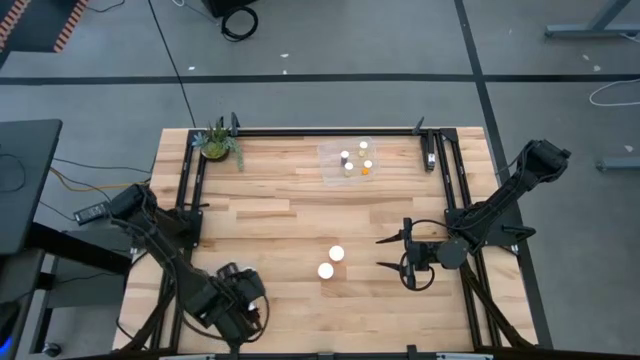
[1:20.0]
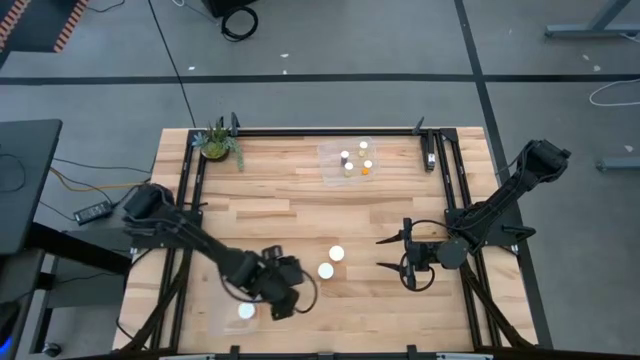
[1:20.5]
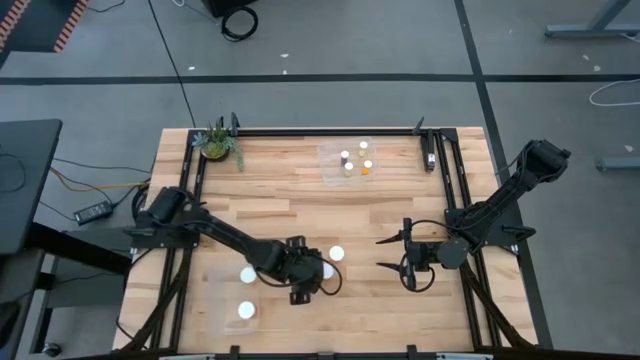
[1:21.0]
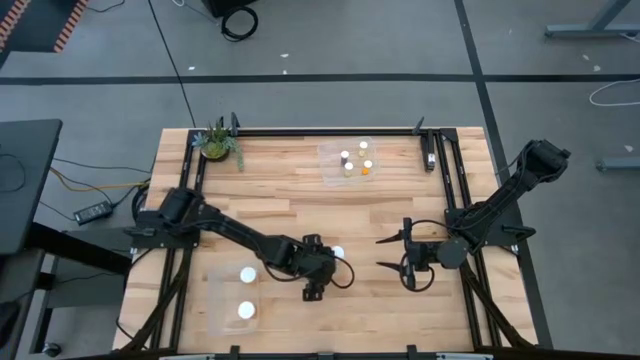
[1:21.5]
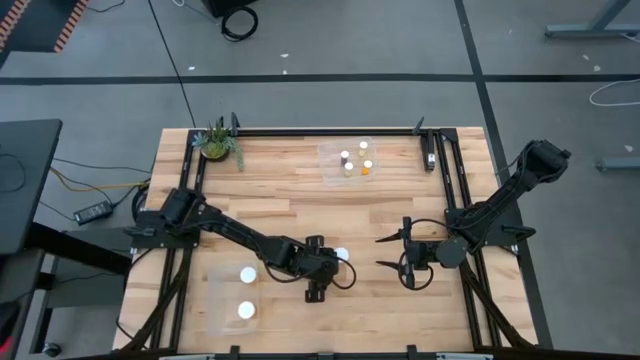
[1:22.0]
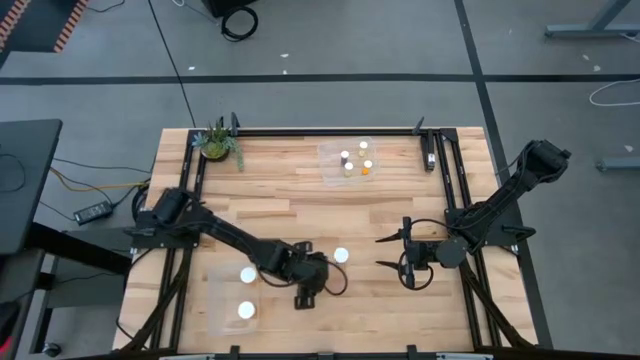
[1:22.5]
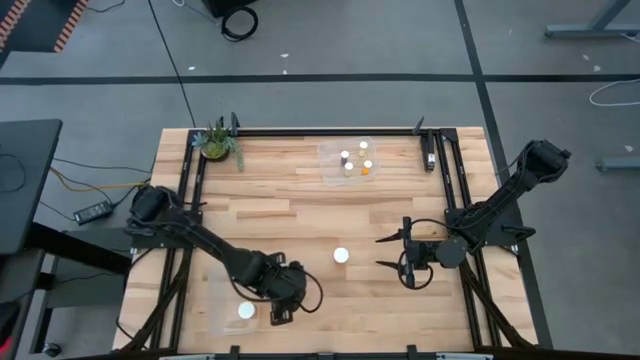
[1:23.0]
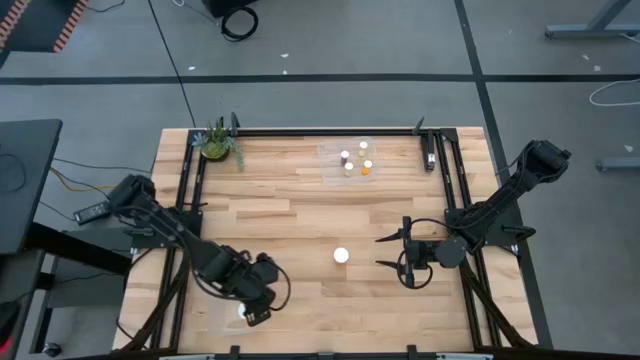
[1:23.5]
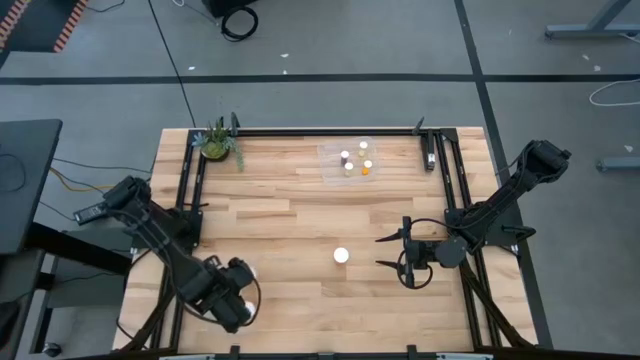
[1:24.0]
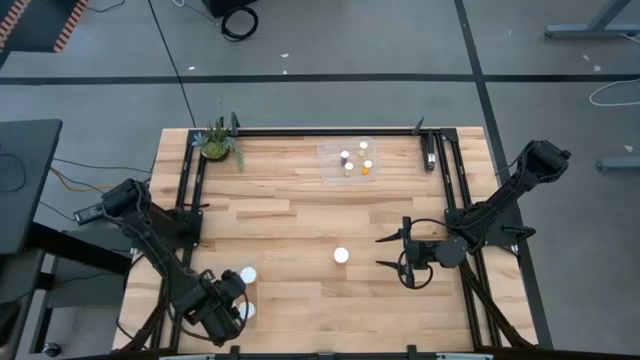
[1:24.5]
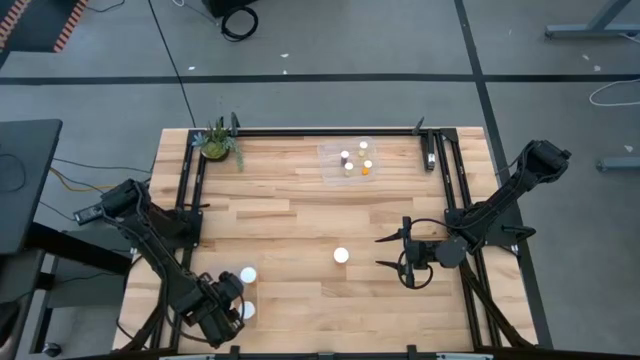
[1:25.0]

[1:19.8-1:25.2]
Task: Pick and place medicine bottles into bin by pill shape (circle, oval)
Put the big orange pill bottle into the bottom transparent bin

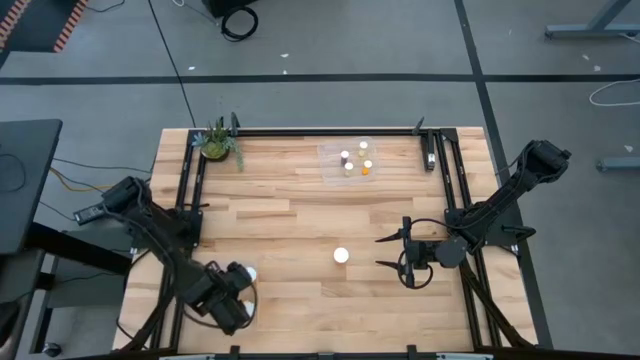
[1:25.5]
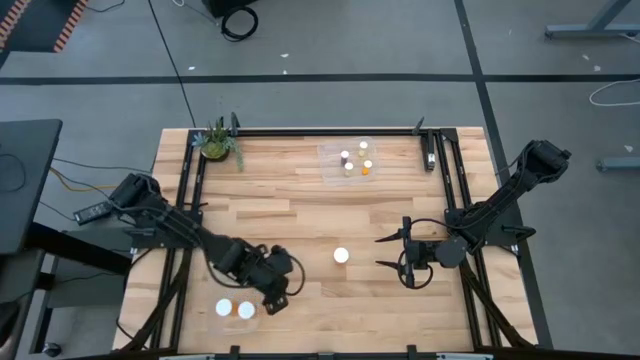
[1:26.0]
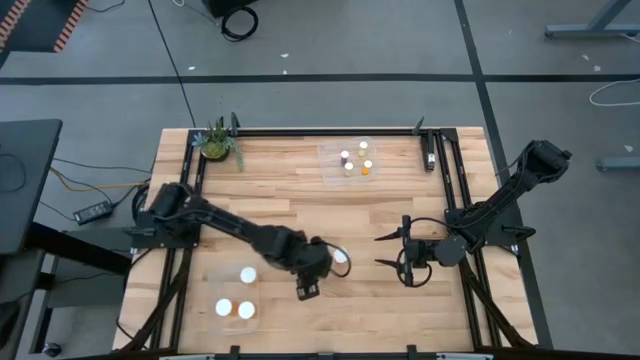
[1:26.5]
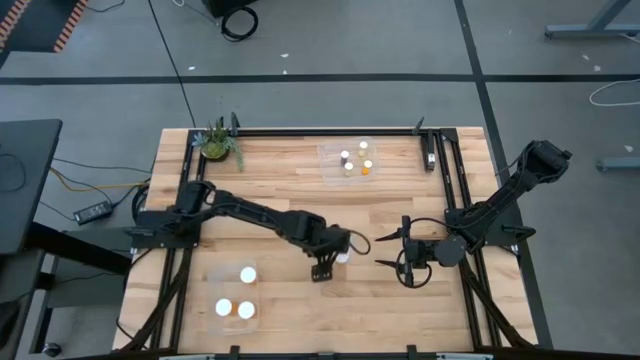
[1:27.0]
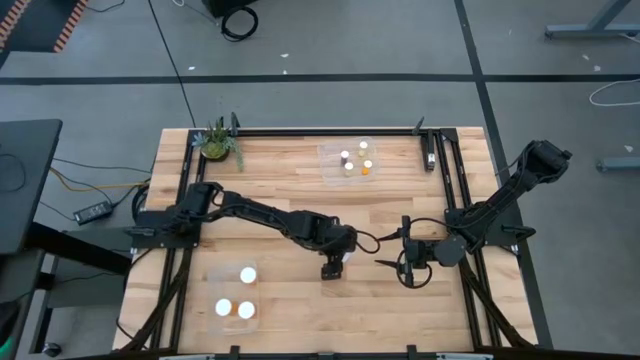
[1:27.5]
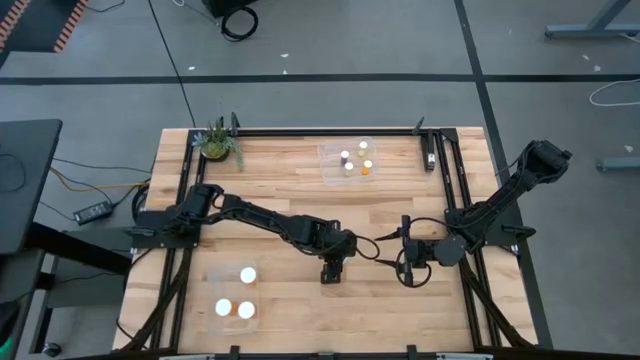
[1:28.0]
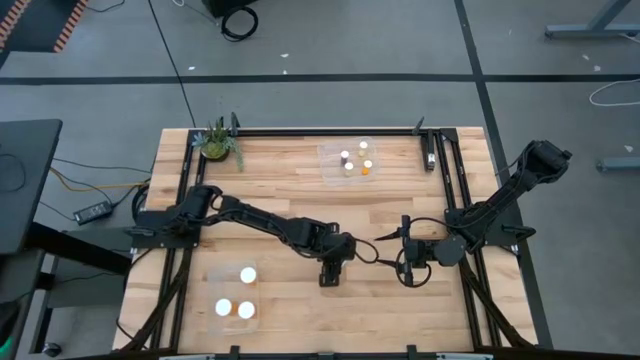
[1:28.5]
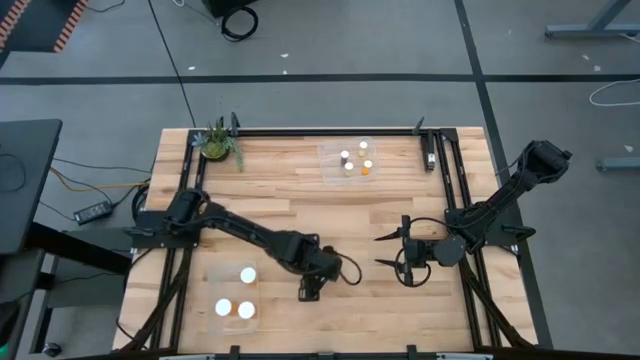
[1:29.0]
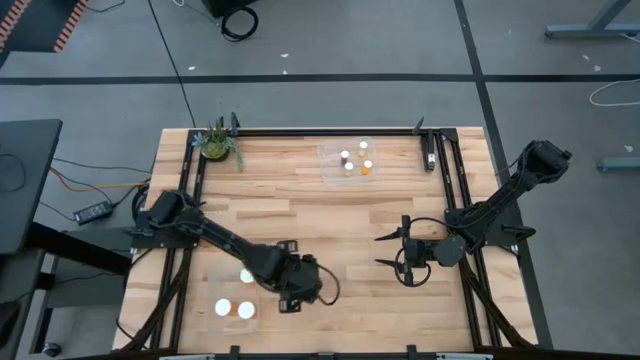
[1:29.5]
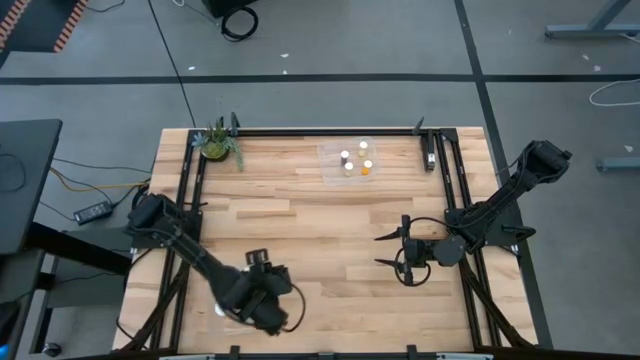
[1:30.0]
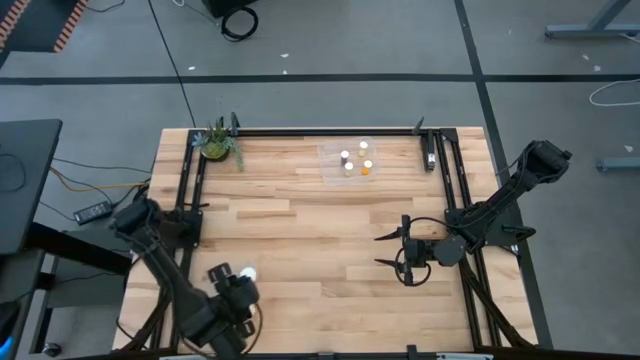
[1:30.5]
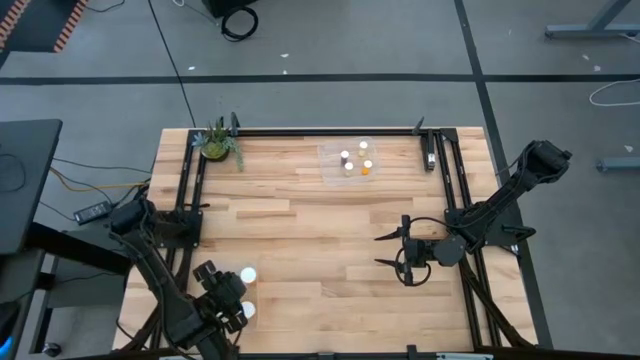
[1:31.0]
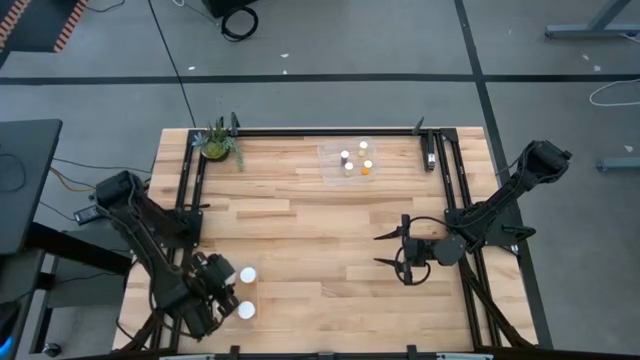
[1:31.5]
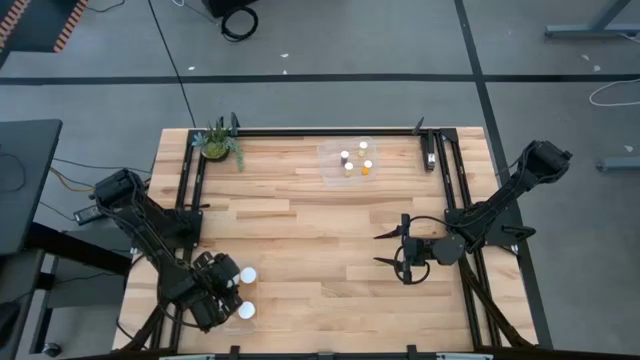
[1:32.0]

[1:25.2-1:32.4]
Put the big orange pill bottle into the bottom transparent bin

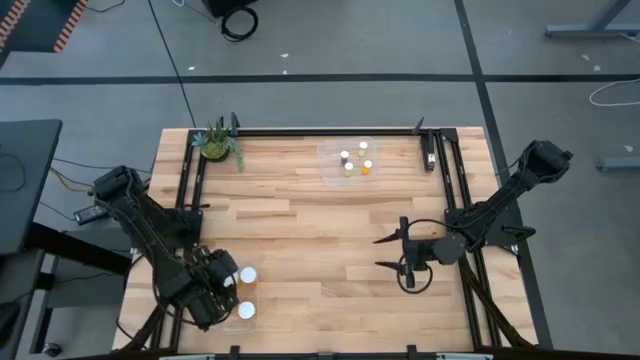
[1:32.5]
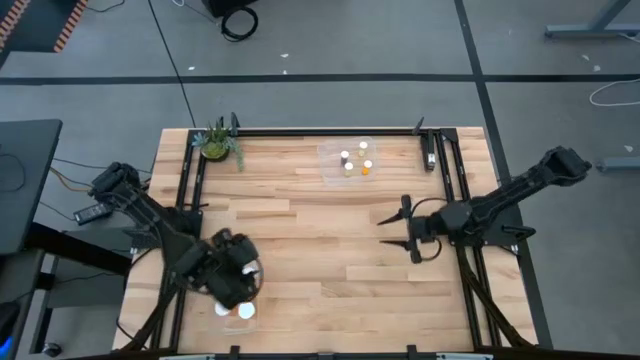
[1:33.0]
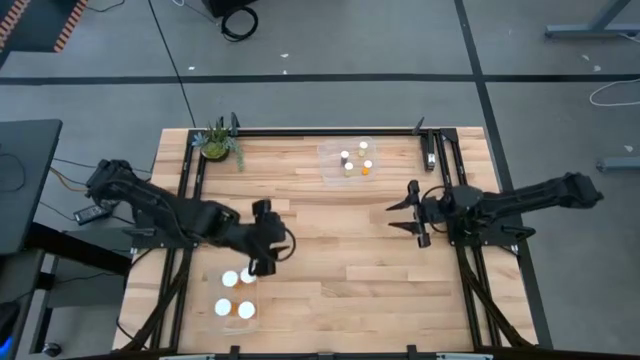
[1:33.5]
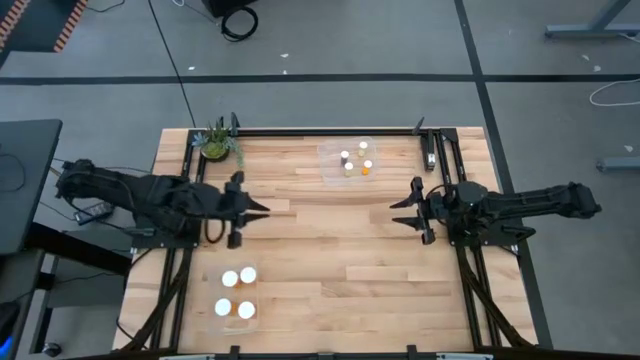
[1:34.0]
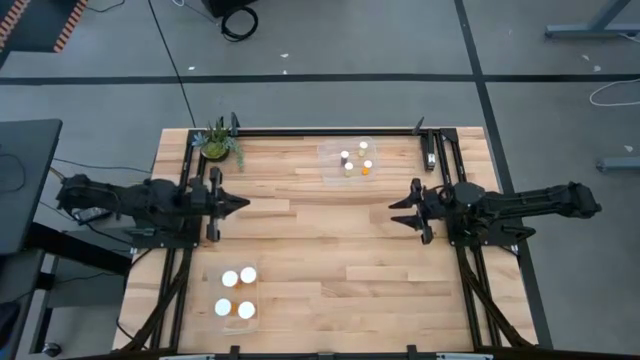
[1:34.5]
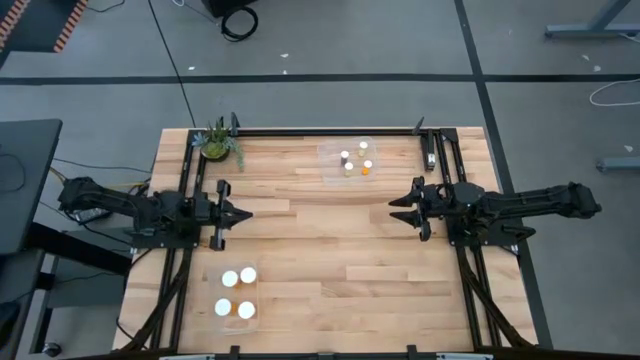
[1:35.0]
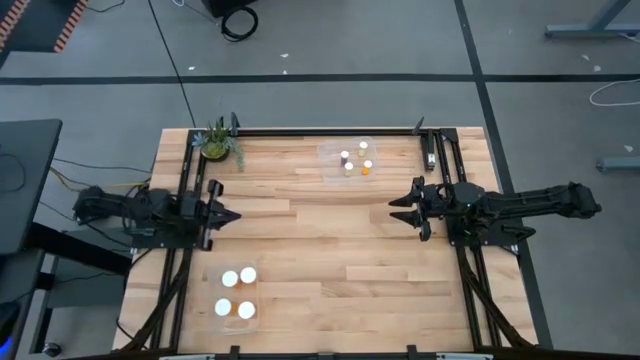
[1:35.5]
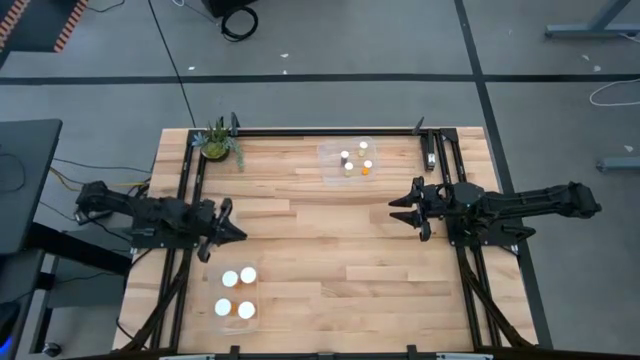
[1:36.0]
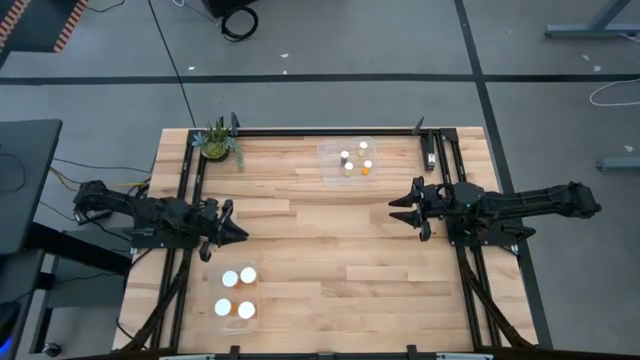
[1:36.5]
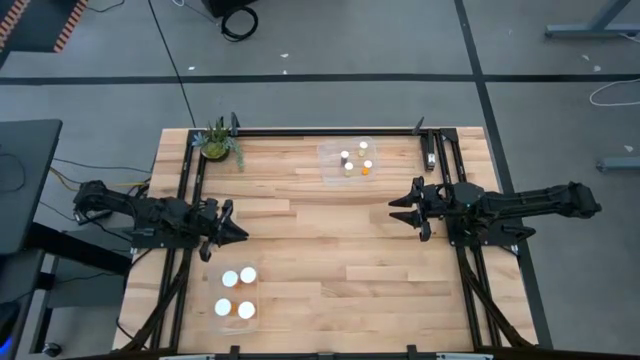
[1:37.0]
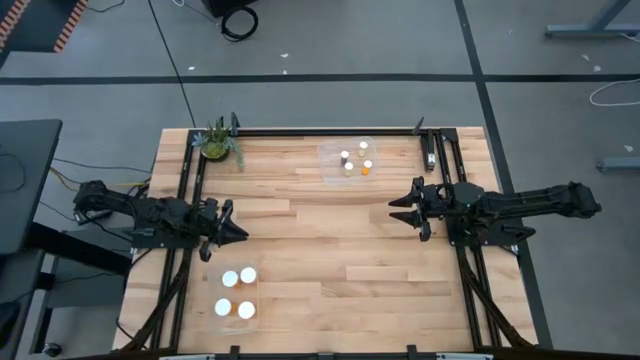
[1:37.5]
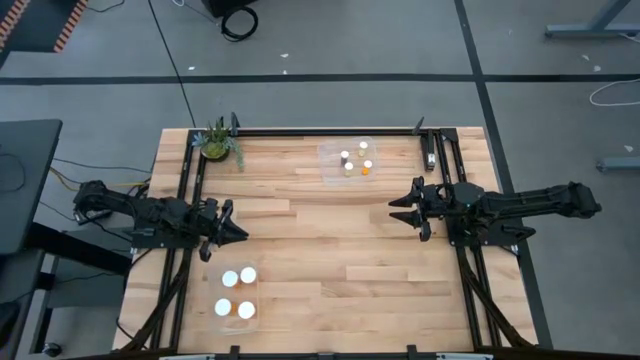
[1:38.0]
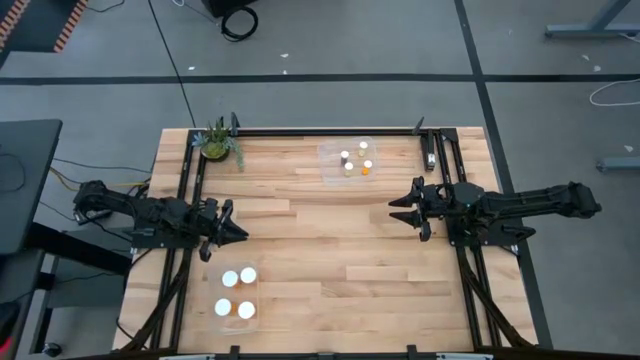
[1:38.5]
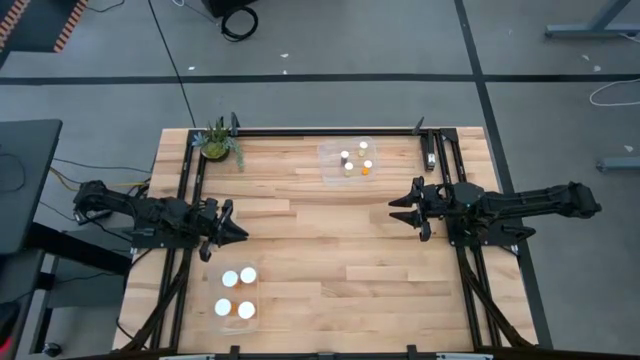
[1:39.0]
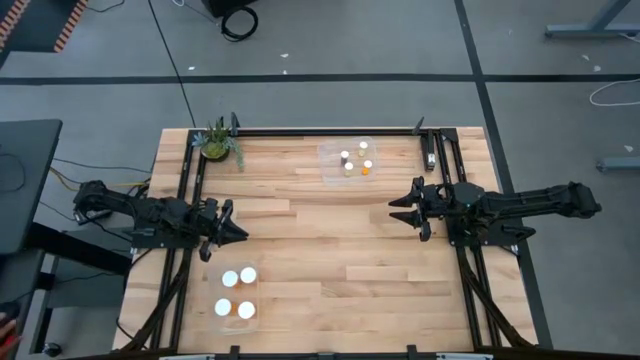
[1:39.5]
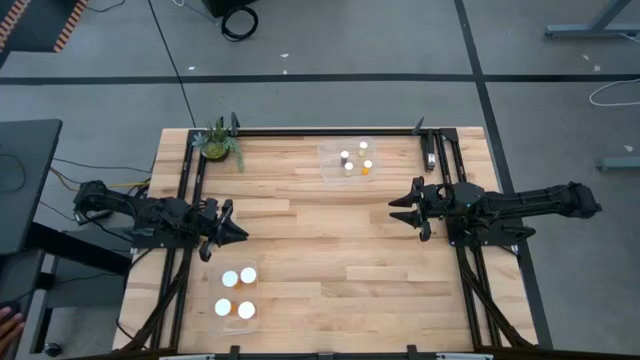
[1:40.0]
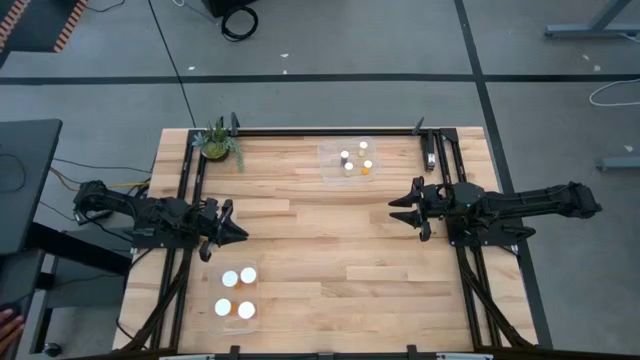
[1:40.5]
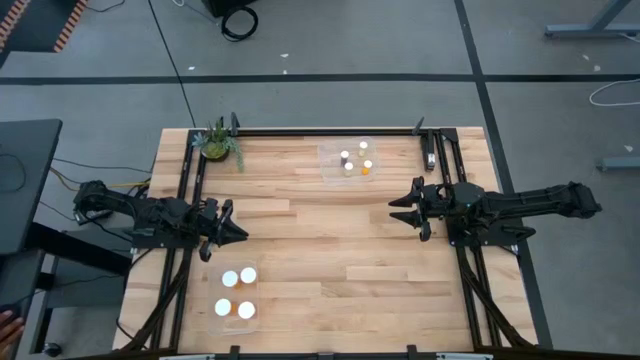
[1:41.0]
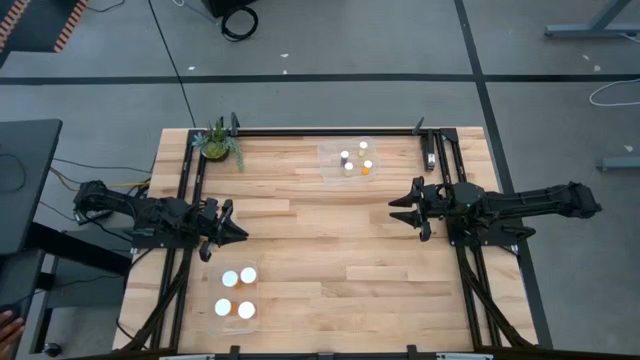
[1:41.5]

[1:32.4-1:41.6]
Return to Home Position
